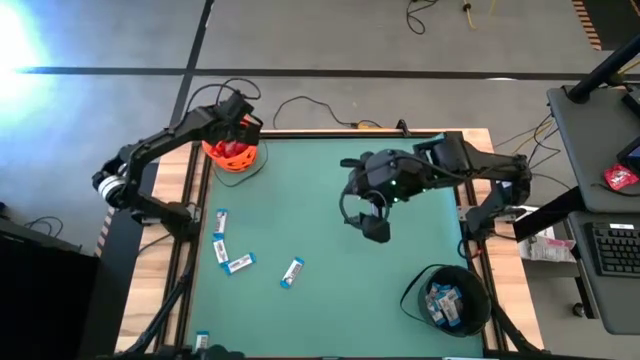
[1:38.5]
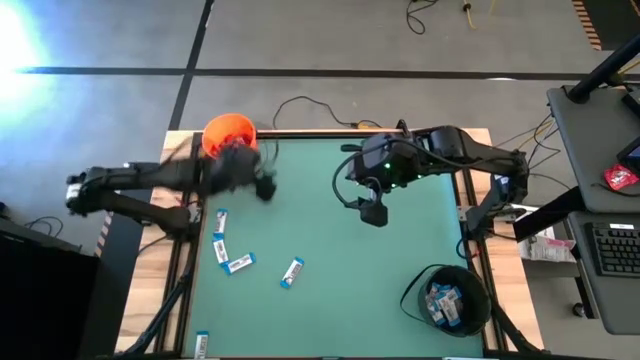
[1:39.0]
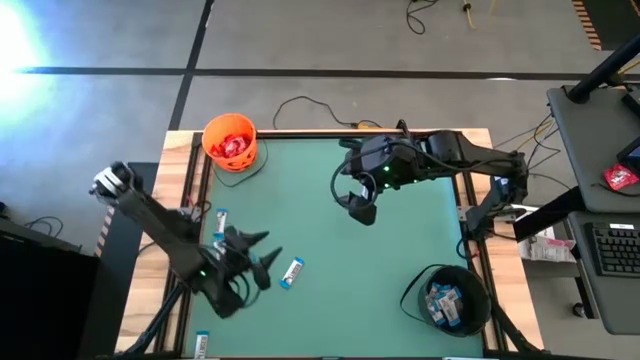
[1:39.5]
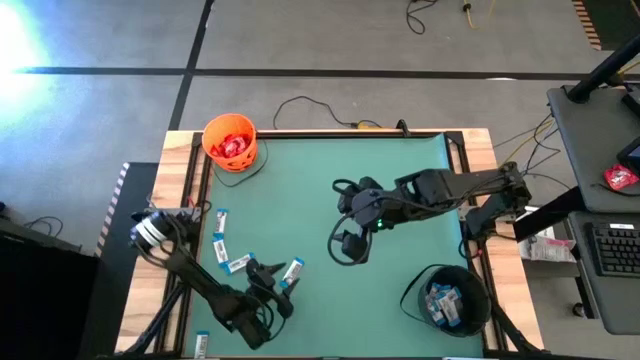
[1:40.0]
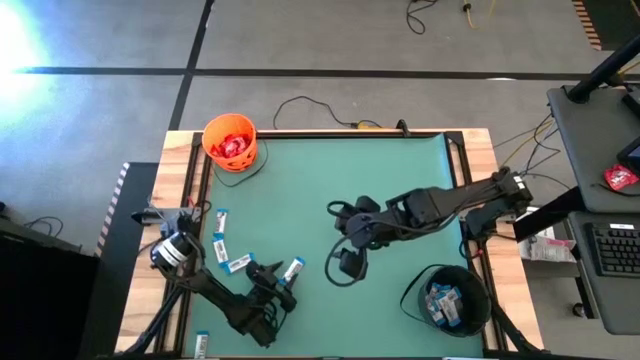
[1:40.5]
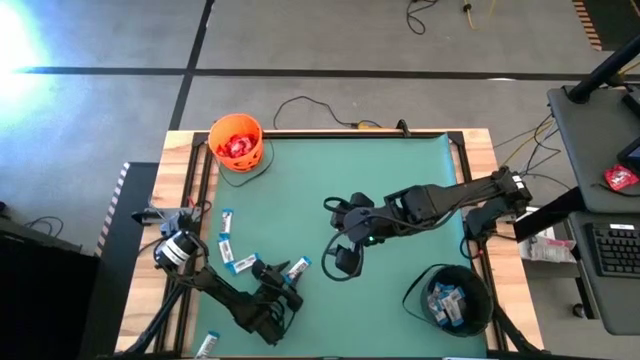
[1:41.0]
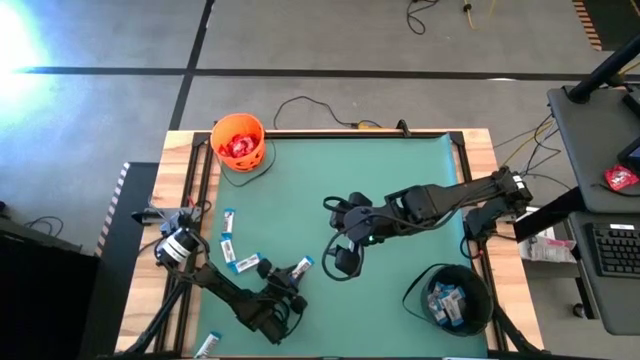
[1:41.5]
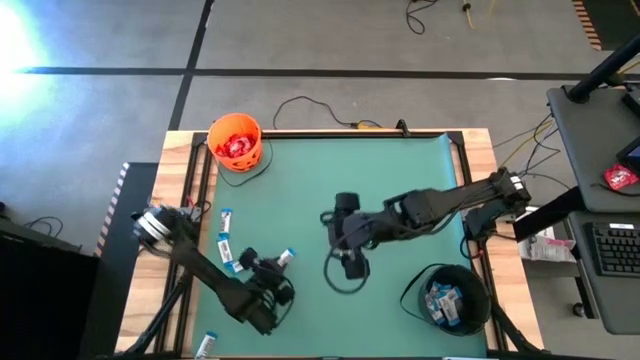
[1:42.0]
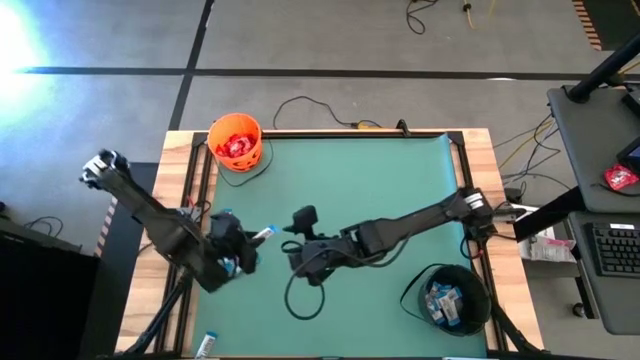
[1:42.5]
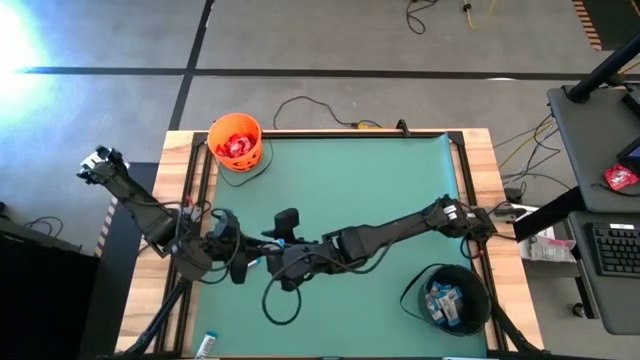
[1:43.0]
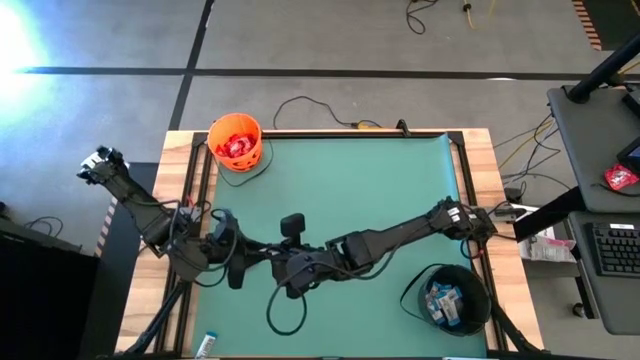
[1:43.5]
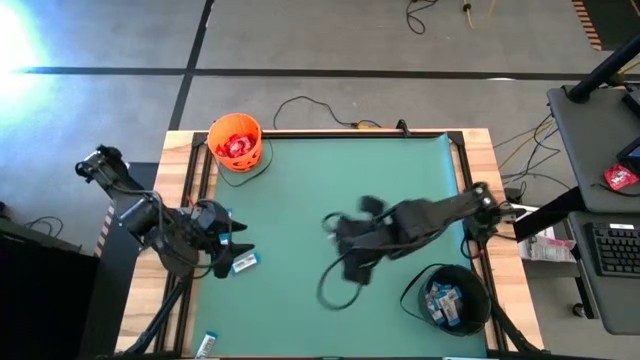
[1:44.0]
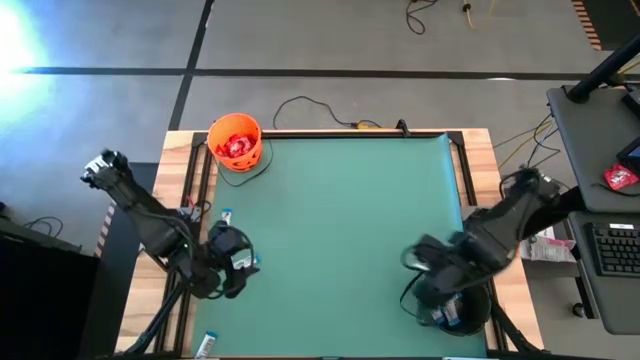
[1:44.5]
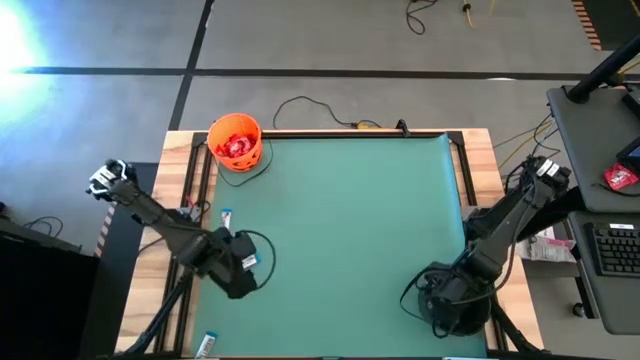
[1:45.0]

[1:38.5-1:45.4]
Task: Sort candy by brand, put in halloween buckets
Put the white chocolate into the black bucket

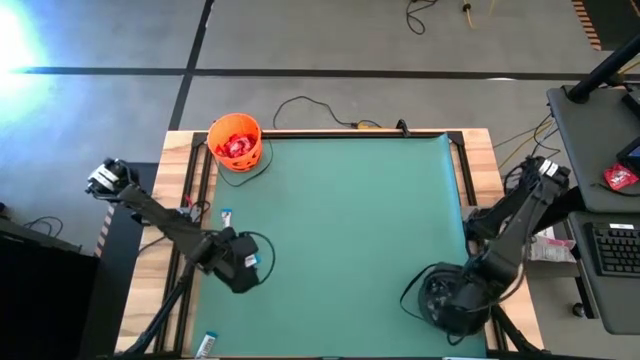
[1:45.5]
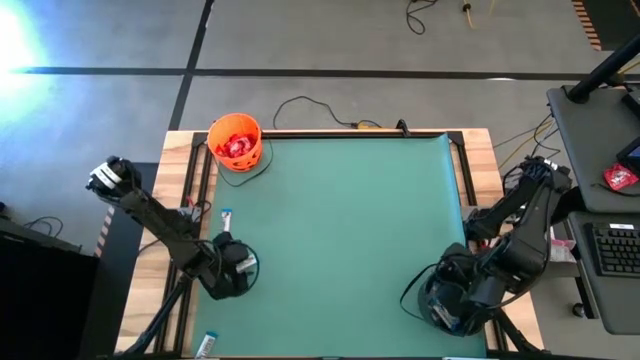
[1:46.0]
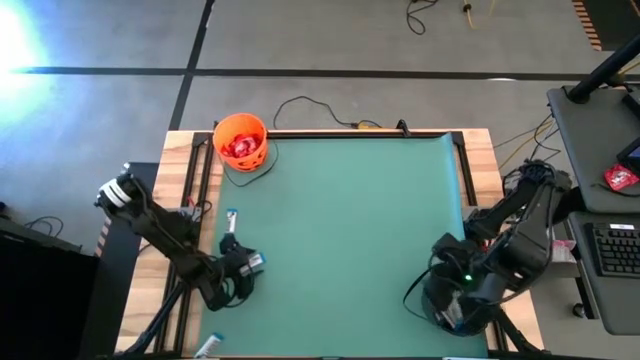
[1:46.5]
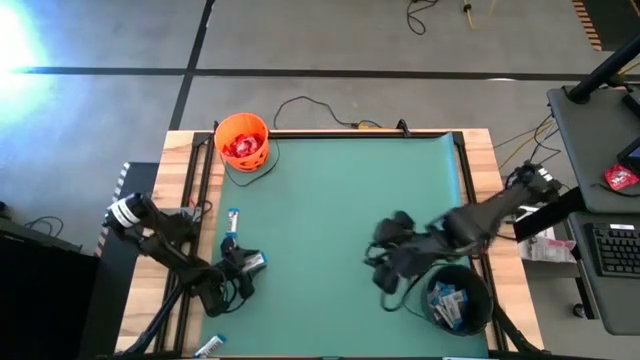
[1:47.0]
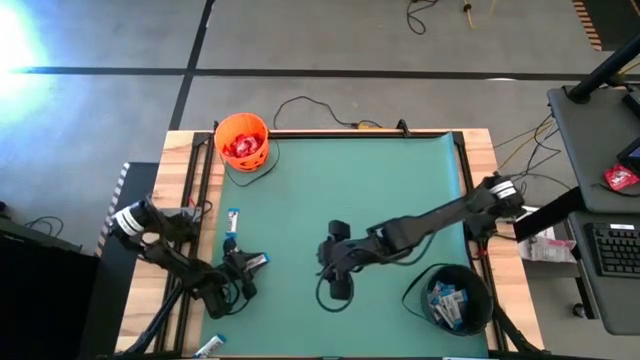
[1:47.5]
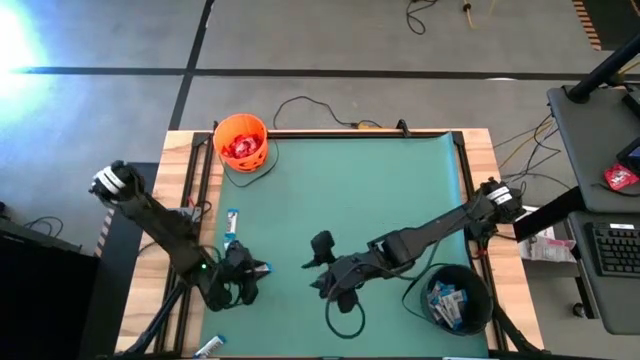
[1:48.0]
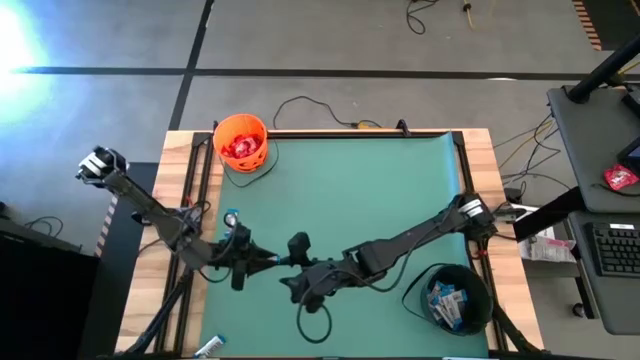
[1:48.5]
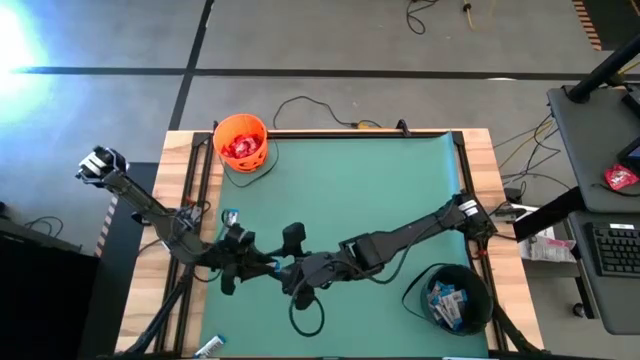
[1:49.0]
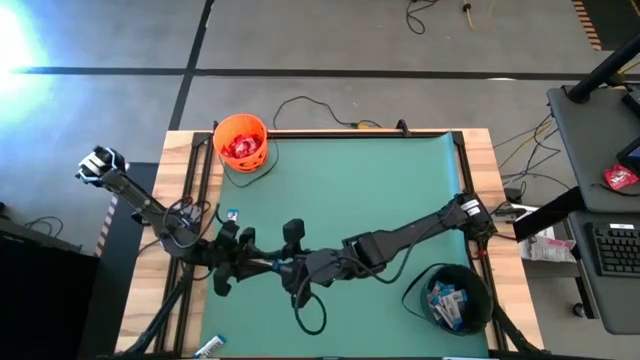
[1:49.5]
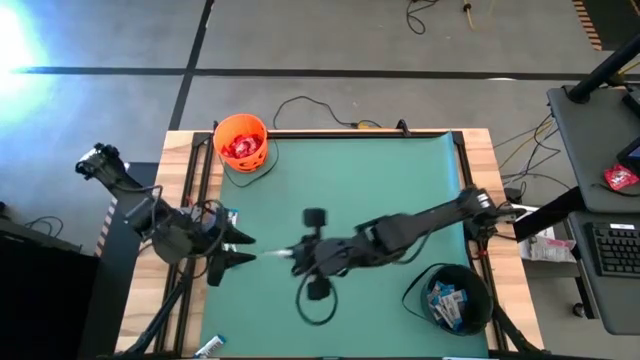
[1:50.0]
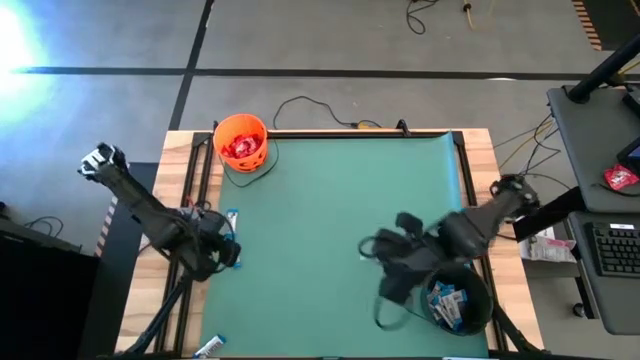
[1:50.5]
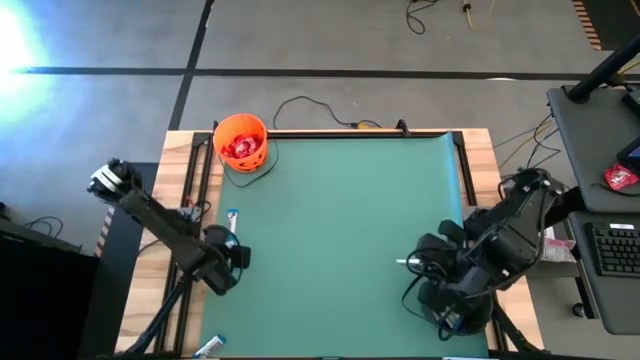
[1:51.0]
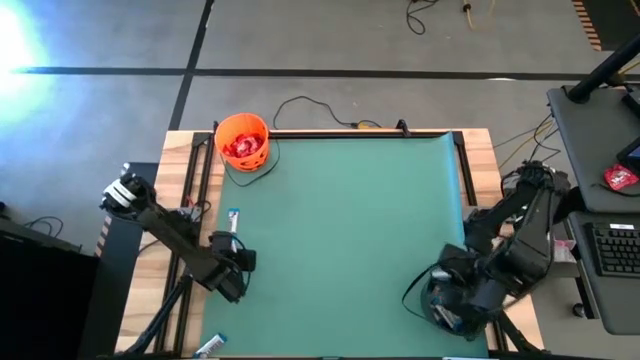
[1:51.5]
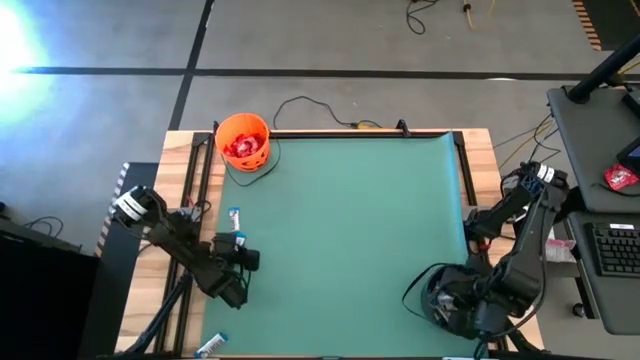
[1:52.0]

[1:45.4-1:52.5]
Put the white chocolate into the black bucket

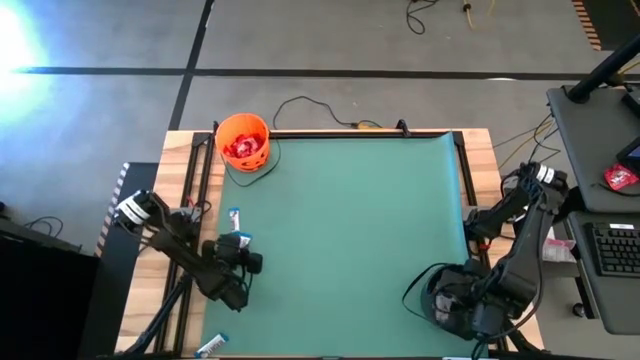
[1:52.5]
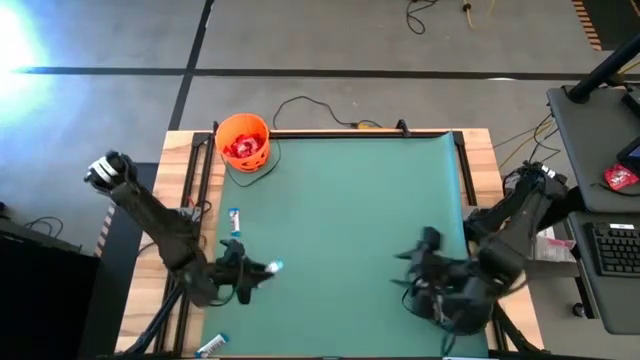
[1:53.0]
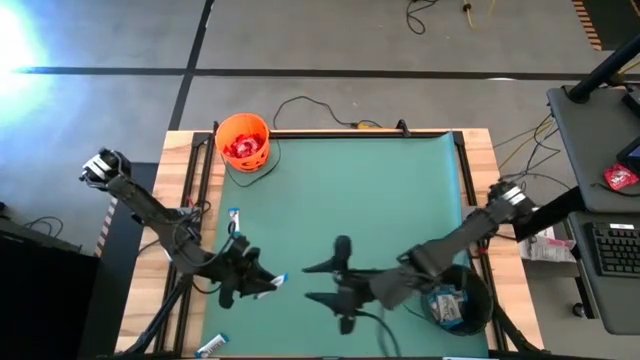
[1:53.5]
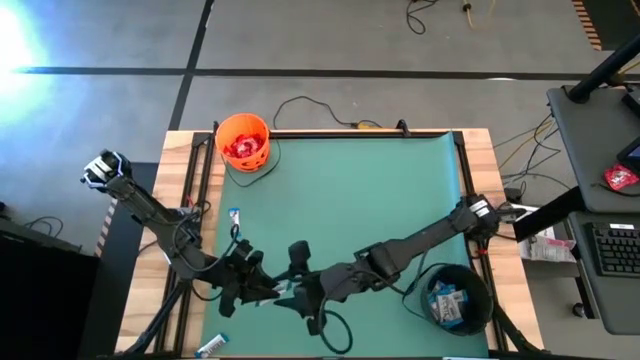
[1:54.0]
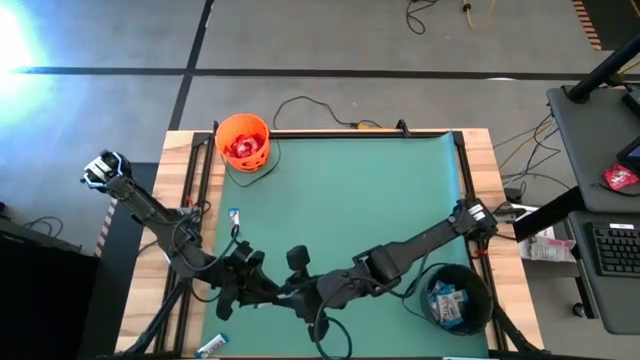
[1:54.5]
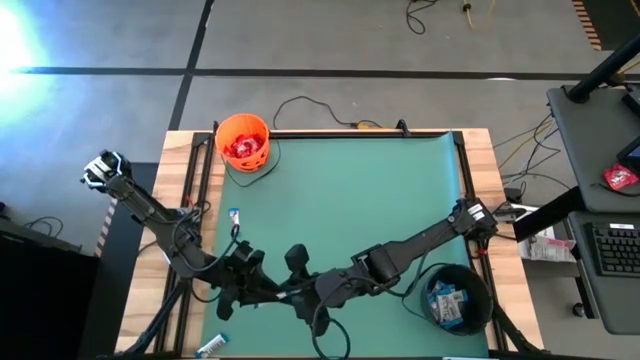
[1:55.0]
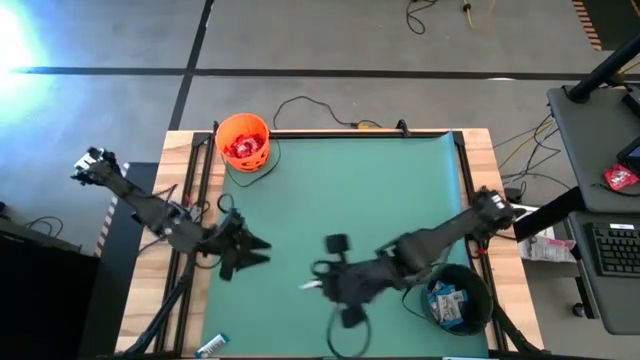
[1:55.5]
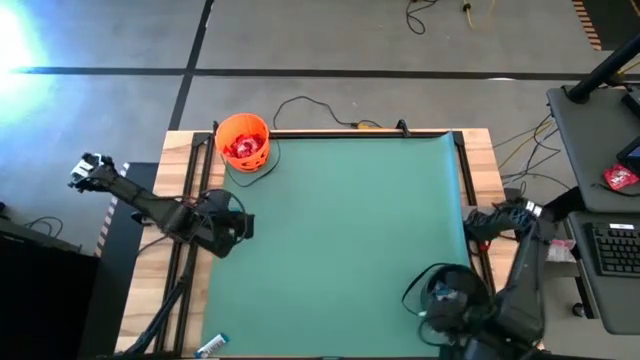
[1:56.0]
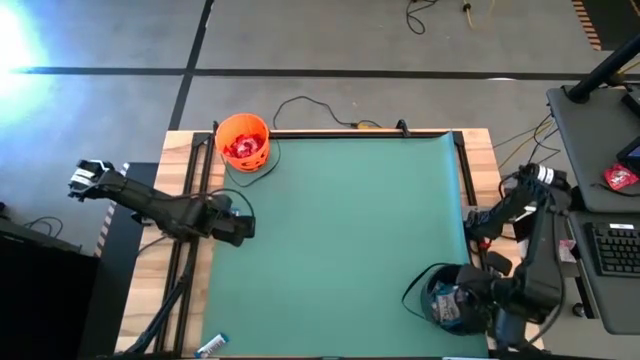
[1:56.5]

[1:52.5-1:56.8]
Put the white chocolate into the black bucket

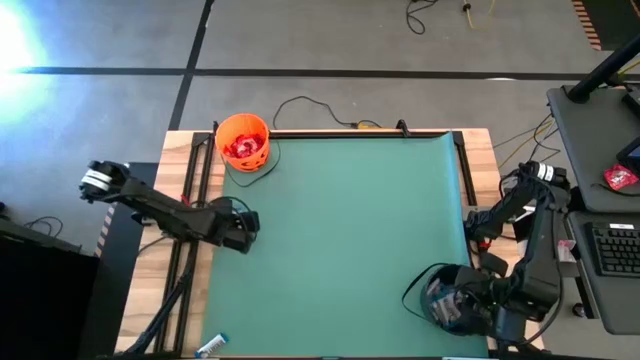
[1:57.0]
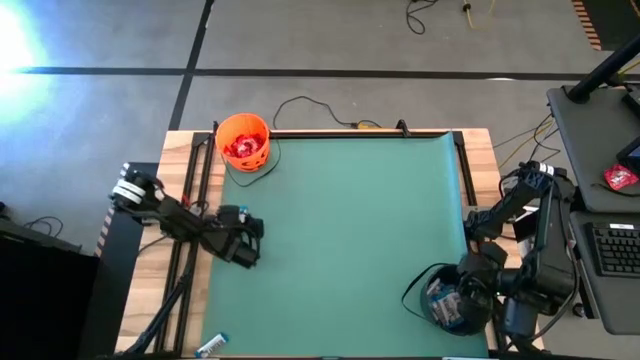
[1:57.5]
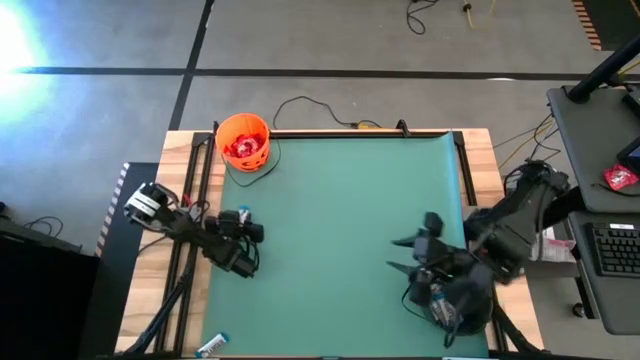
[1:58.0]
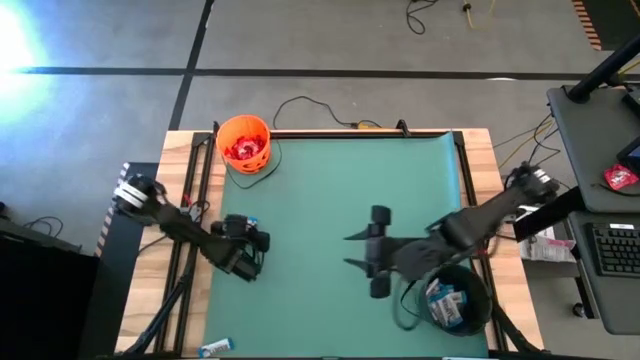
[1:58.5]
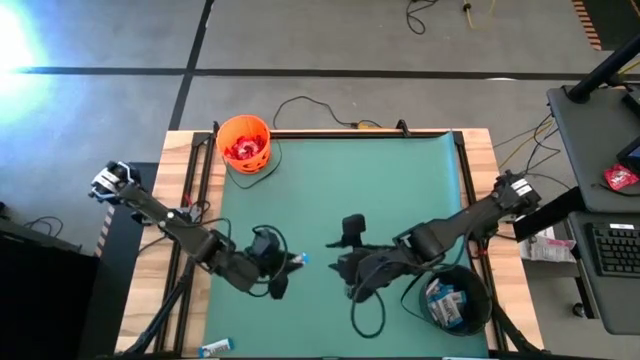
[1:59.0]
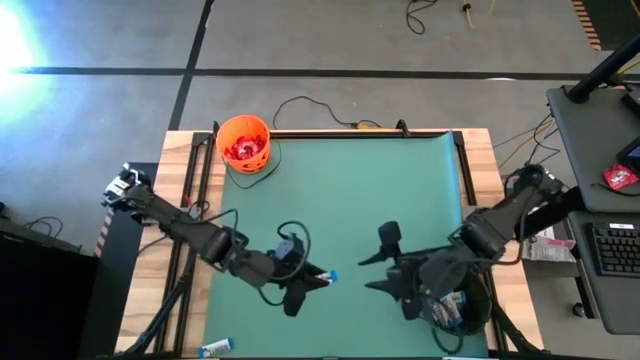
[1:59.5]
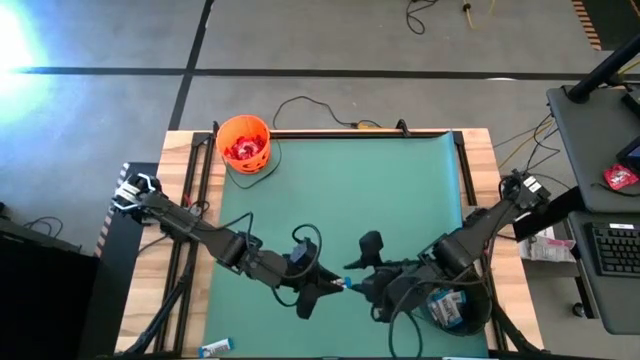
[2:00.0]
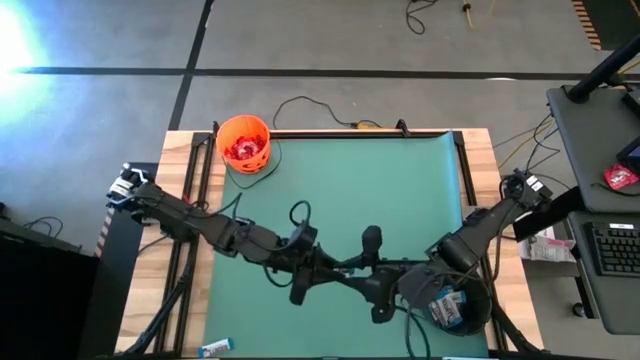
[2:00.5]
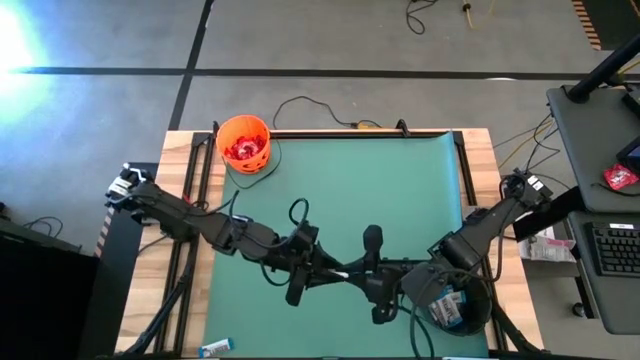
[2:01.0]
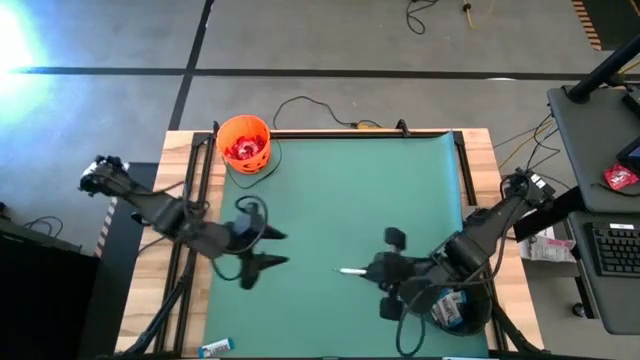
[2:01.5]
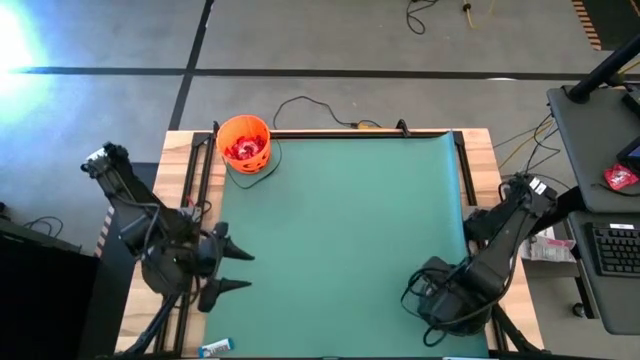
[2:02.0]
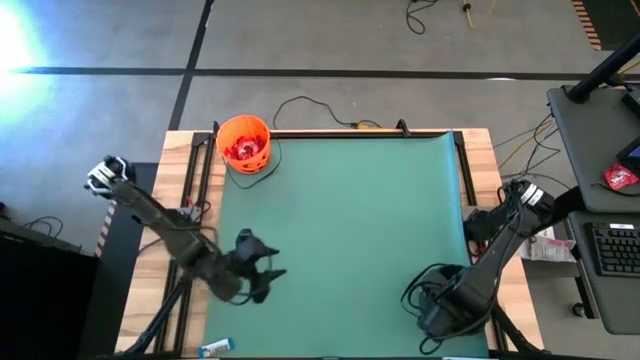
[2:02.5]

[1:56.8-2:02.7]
Put the white chocolate into the black bucket
